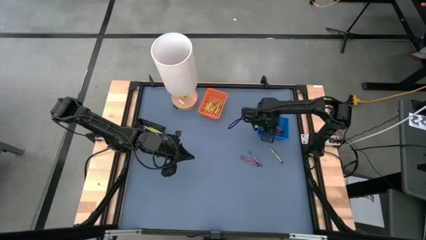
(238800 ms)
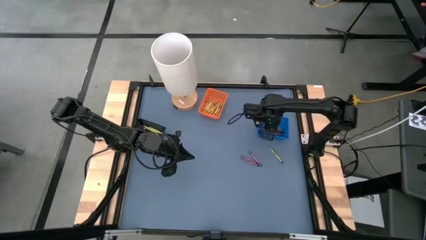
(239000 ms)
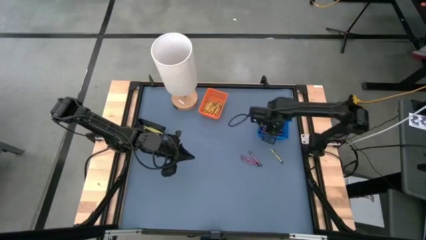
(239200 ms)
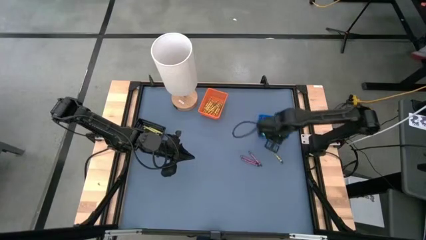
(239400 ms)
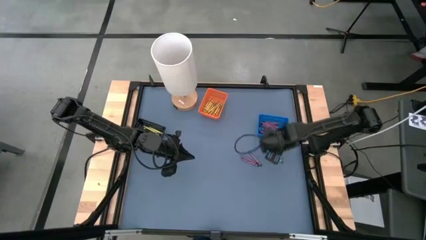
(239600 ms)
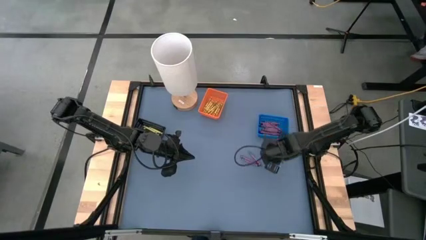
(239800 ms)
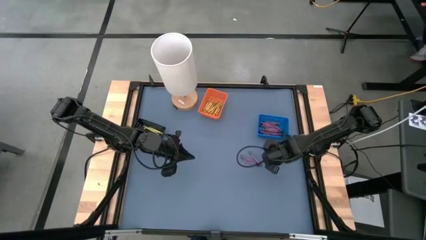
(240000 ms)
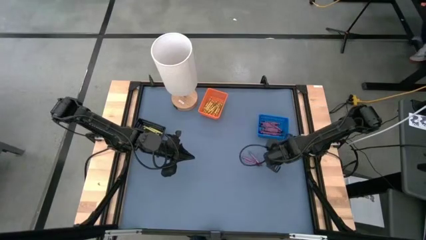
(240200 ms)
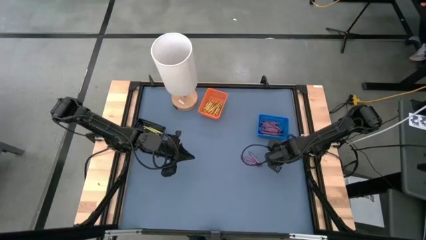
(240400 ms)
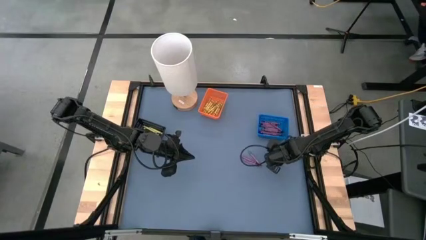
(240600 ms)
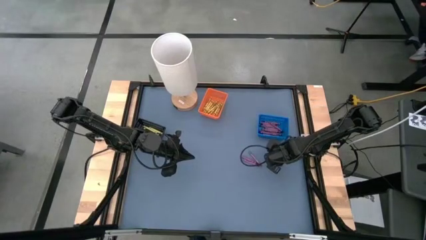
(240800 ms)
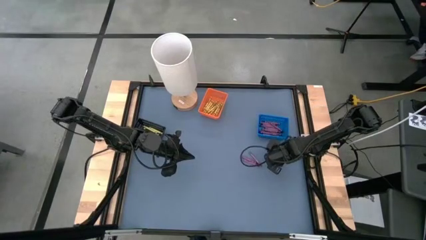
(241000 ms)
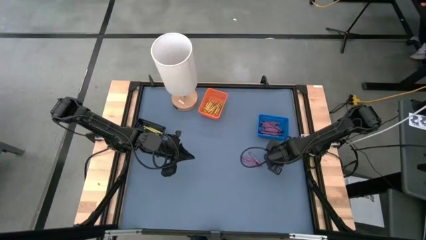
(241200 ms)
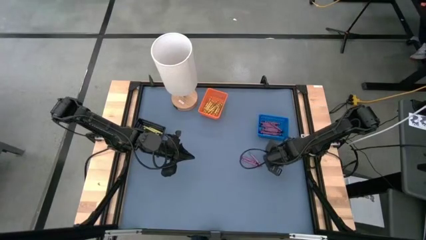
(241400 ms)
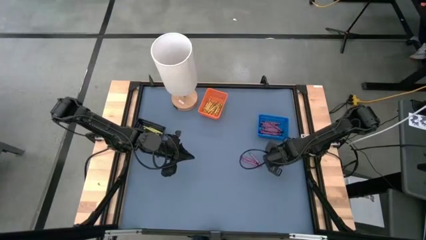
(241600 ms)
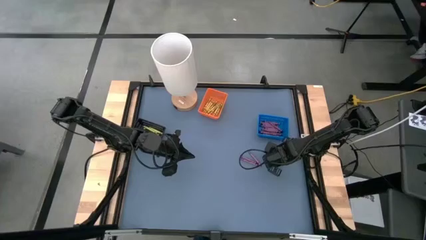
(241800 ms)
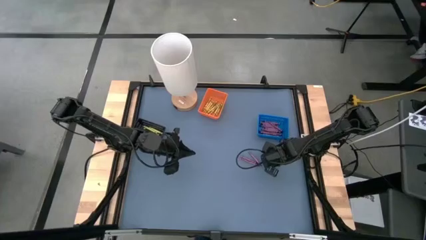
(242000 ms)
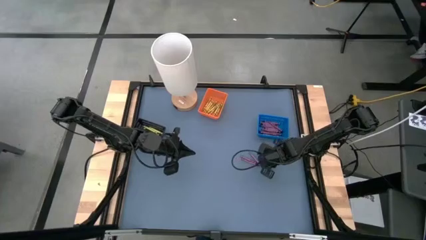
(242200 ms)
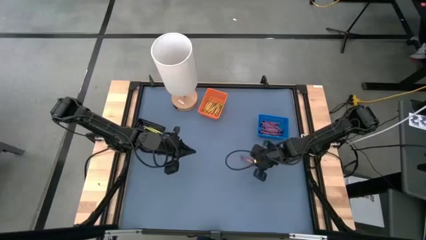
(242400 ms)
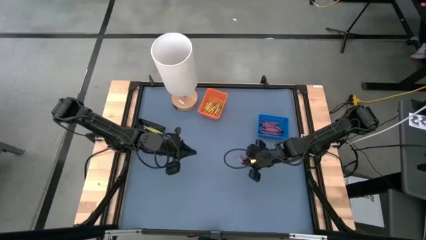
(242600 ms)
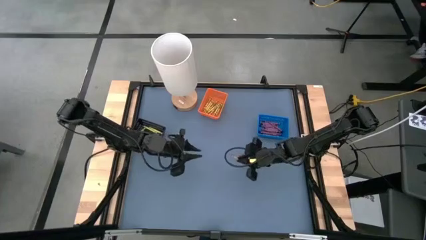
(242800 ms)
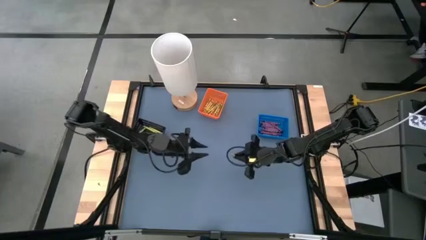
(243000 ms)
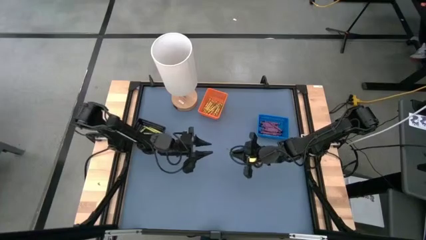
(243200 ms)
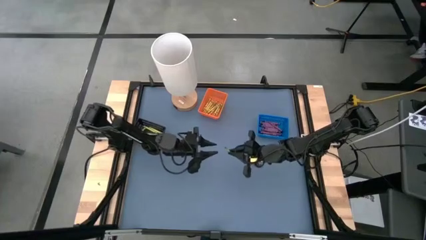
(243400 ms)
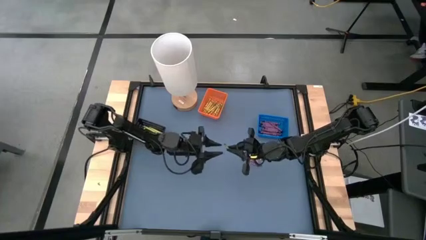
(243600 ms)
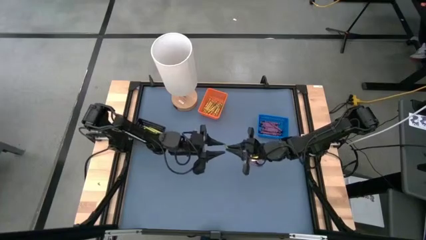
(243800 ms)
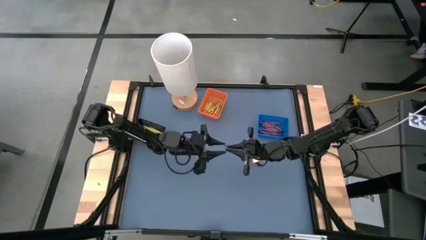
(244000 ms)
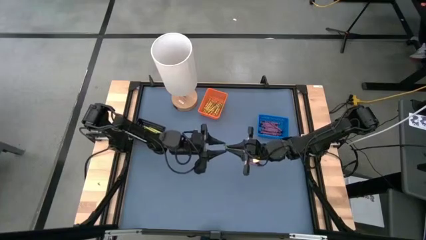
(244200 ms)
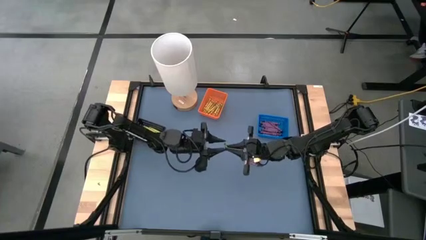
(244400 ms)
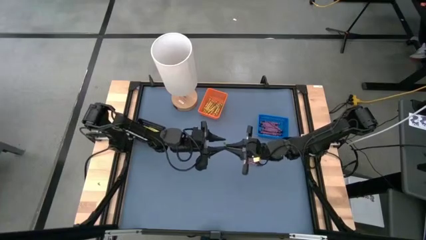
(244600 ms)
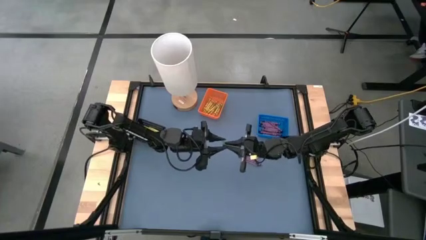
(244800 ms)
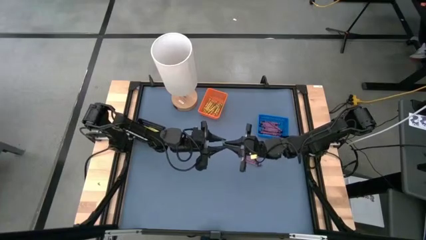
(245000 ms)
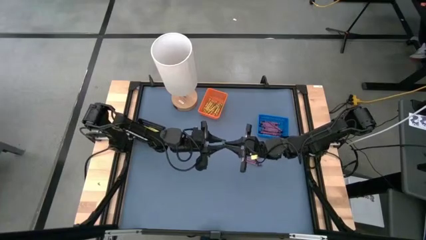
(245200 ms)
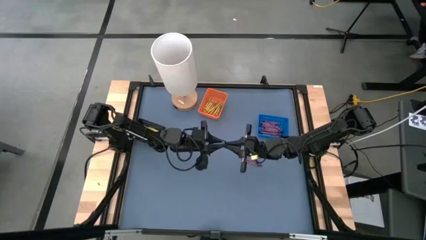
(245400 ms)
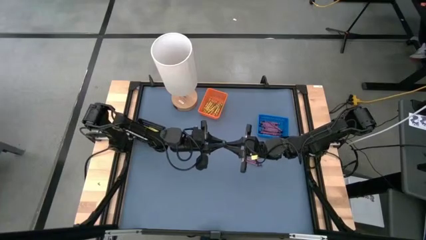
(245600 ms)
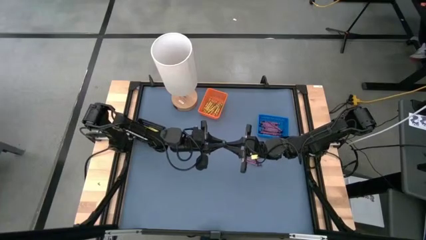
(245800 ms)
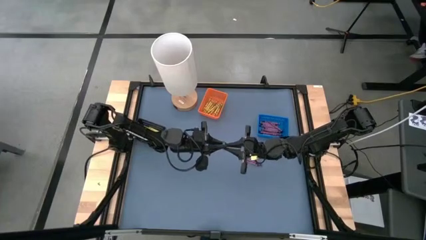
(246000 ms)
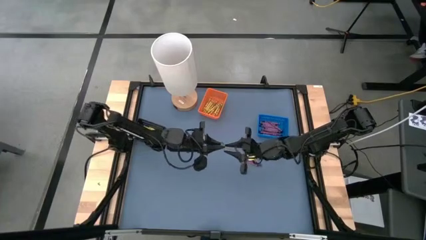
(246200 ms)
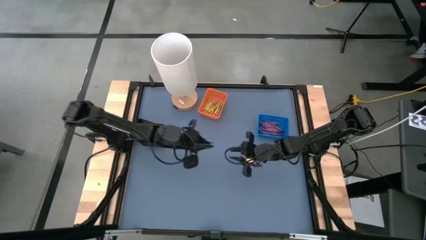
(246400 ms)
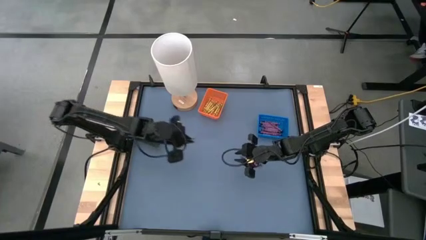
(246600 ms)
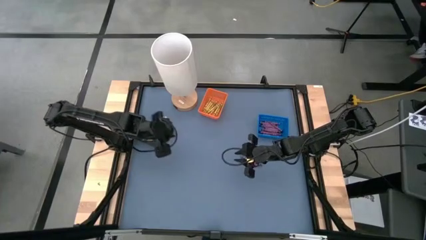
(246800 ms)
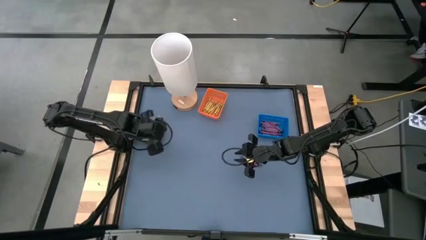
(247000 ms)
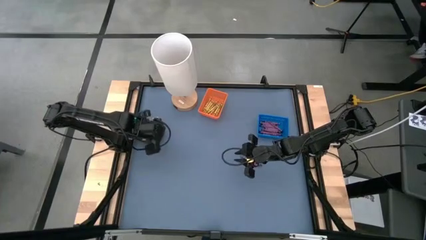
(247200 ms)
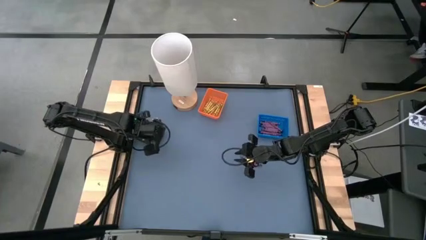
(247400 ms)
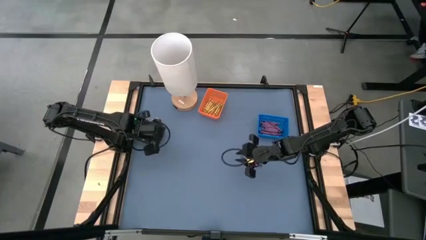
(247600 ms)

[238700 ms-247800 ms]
Task: Sort crayons
Put the green crayon into the black basket

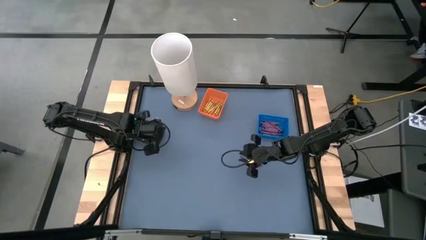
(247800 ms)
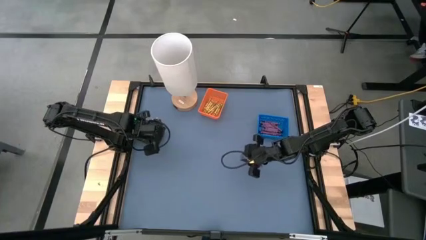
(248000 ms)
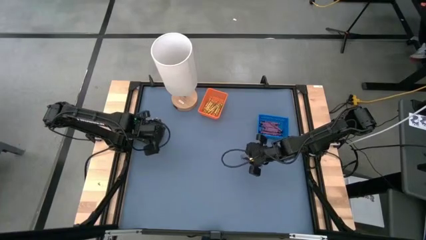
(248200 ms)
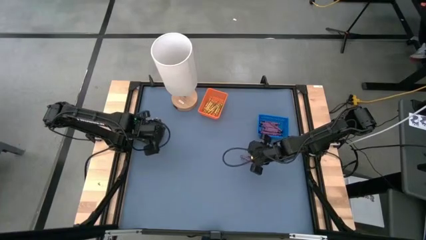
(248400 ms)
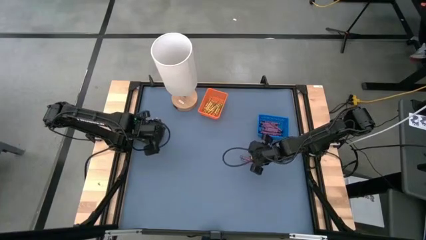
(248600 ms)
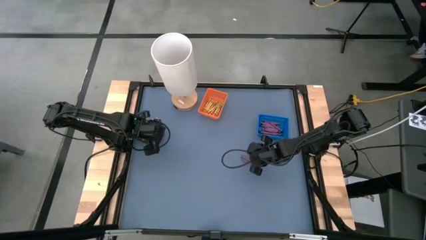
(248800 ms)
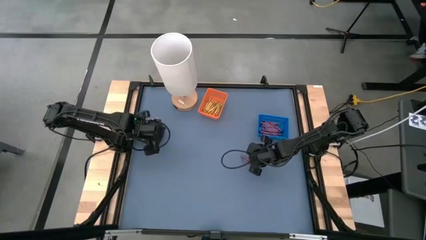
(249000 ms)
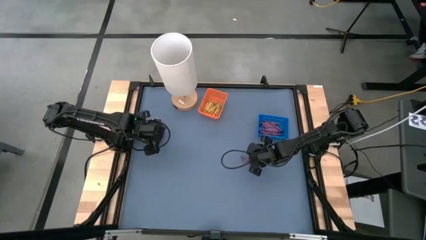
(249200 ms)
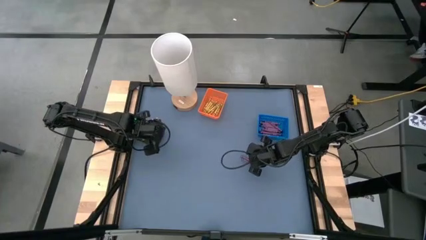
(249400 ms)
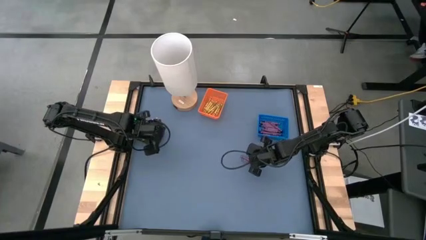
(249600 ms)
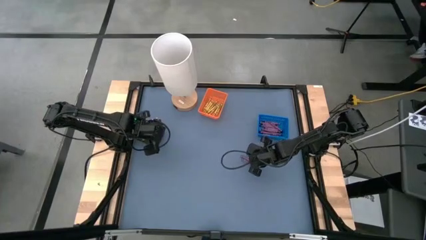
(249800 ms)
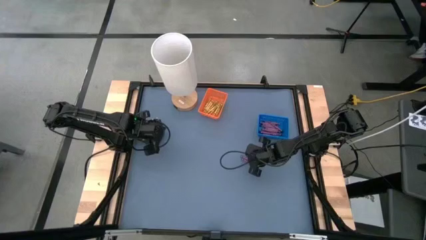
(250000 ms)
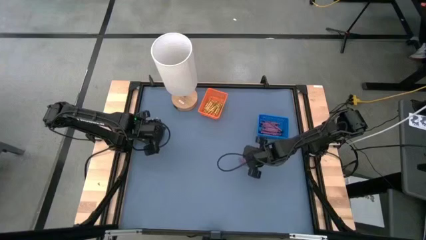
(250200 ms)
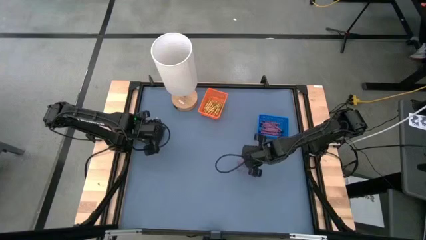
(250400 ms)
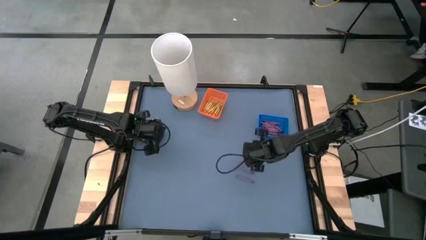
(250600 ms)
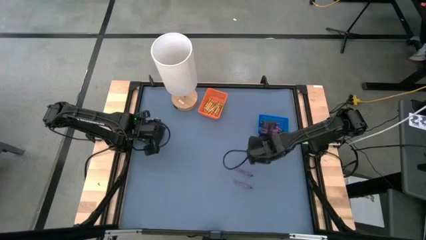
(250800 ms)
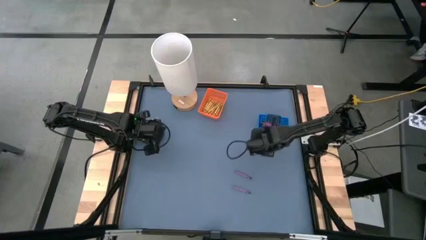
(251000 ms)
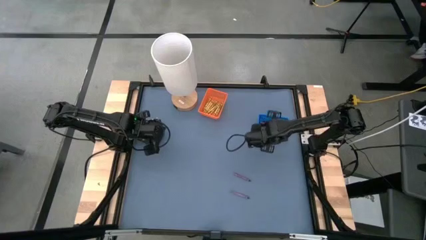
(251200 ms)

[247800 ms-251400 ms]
Put the violet crayon into the blue basket

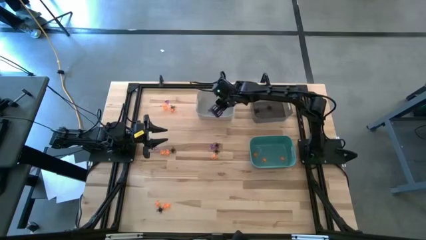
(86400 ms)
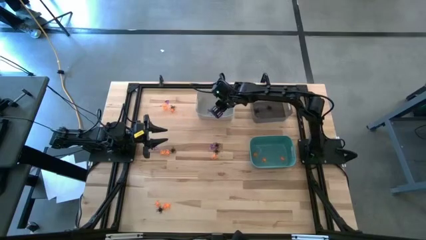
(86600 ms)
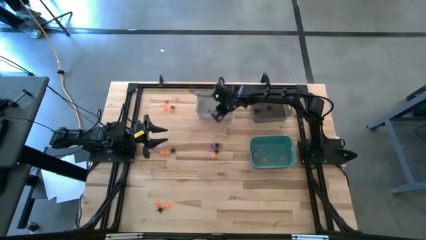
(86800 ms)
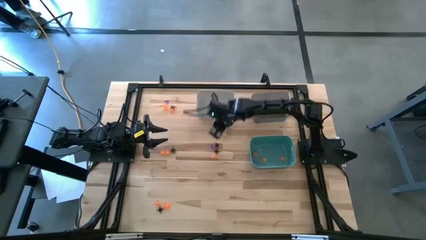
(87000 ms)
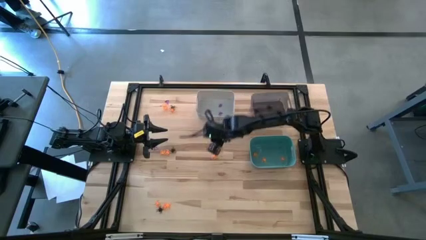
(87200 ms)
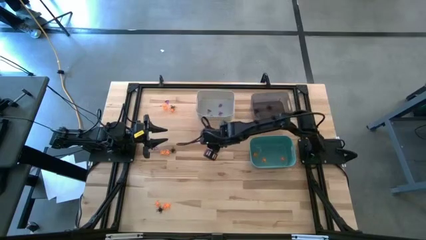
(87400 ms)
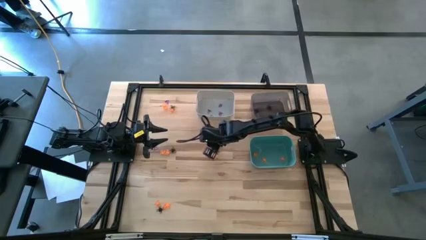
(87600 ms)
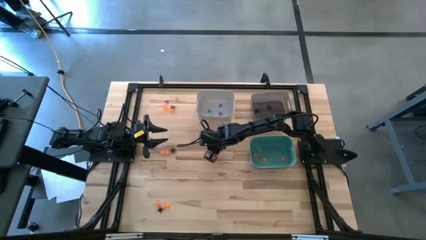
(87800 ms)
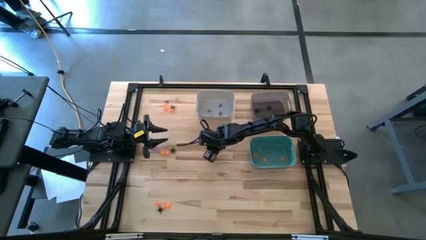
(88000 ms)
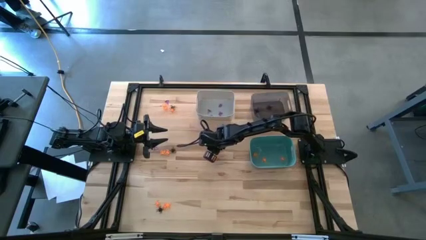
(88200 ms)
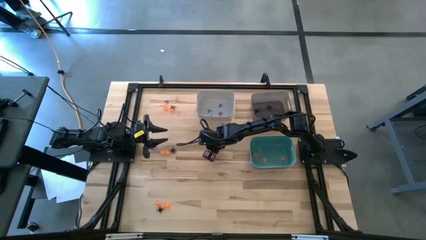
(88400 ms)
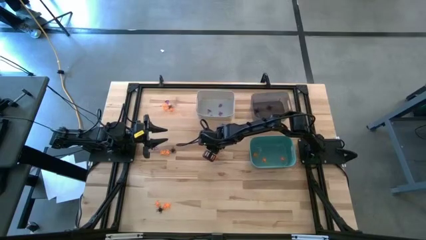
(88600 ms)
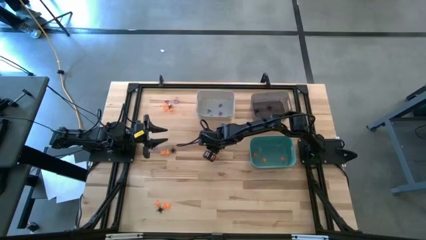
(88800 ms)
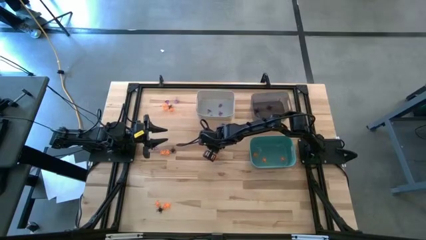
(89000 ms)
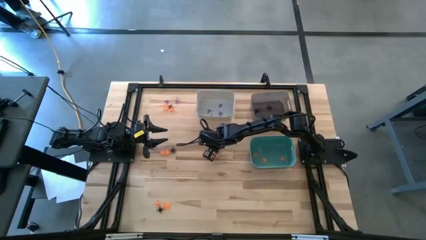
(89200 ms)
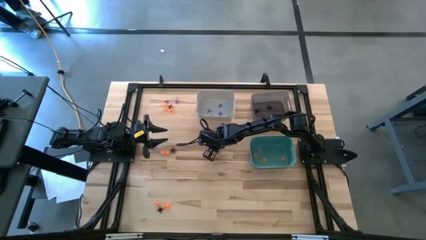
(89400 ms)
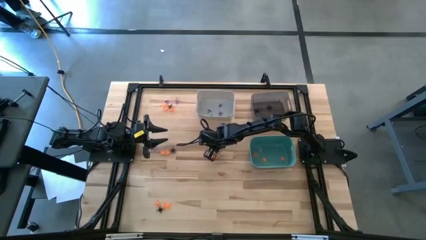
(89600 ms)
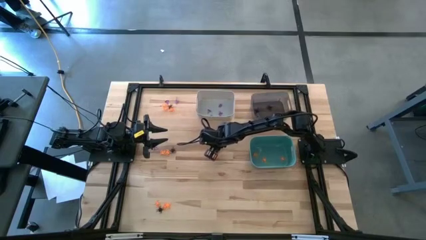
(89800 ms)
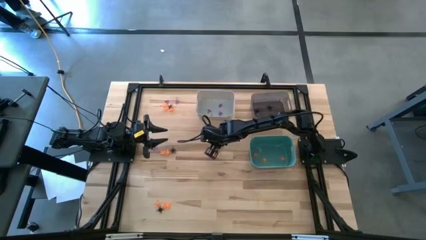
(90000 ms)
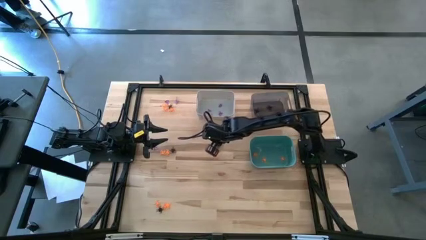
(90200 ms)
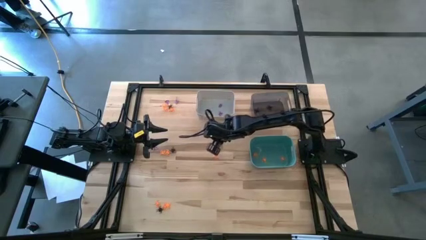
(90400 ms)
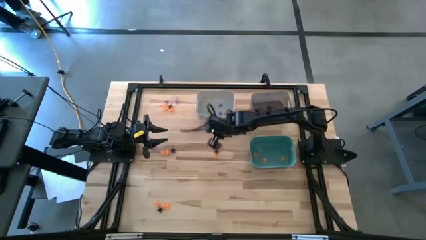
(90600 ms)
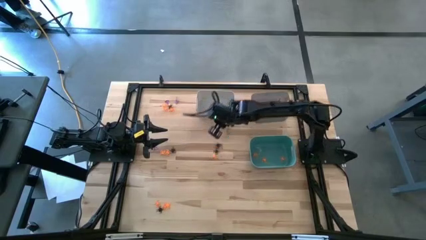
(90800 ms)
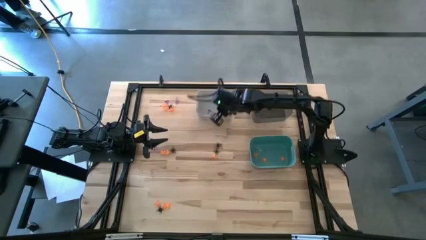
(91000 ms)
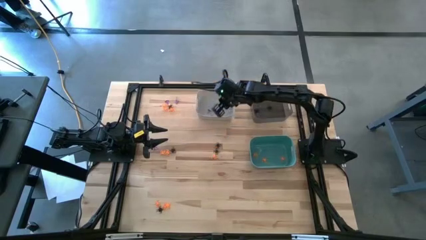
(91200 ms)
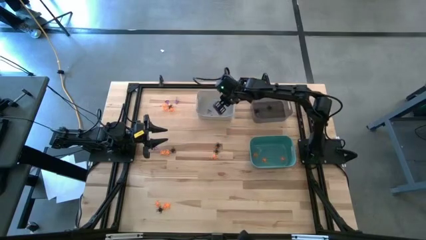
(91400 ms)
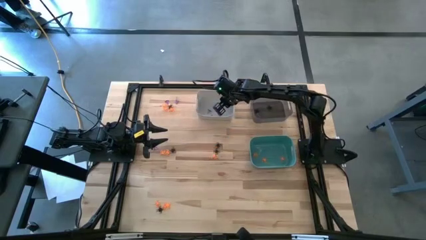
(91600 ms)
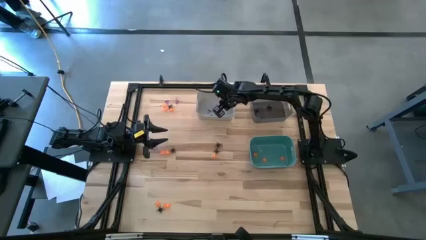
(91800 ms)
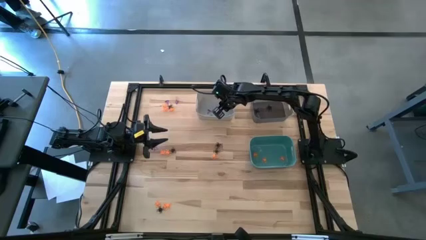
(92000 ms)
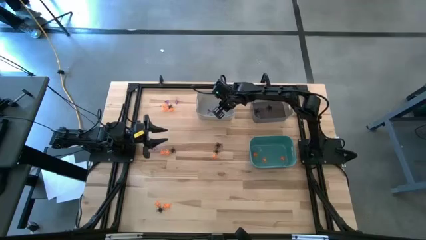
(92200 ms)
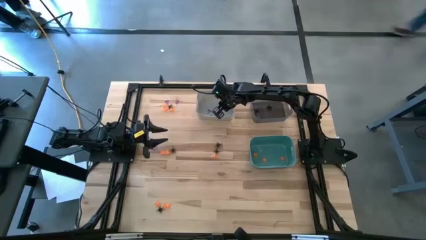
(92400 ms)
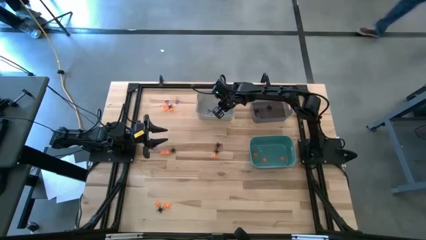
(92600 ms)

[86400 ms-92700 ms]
Task: Sort Halloween decoration
Put the purple witch hat toy into the white bin
